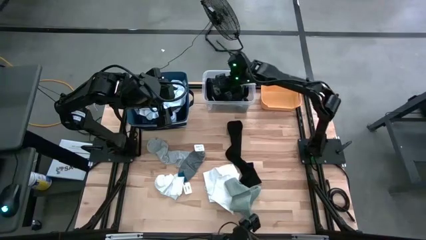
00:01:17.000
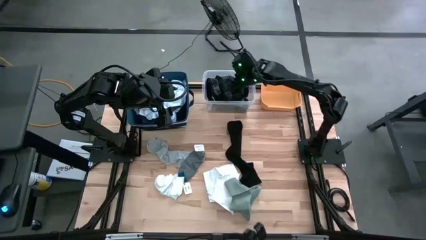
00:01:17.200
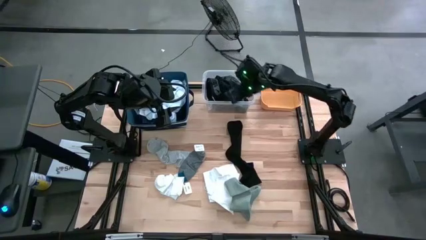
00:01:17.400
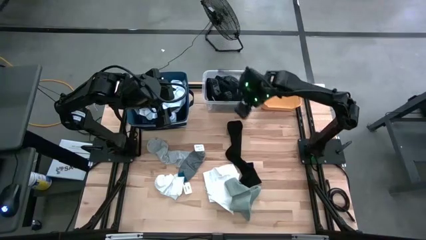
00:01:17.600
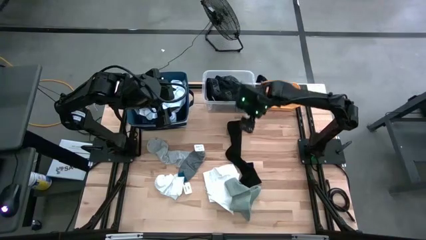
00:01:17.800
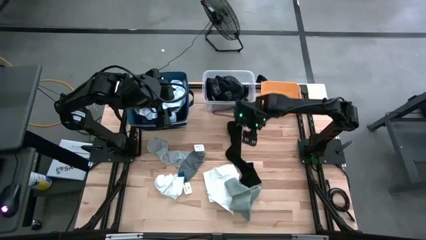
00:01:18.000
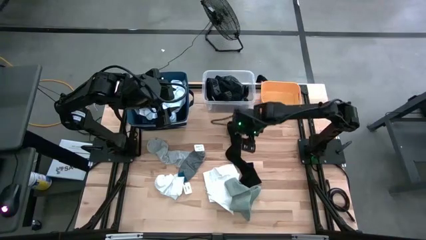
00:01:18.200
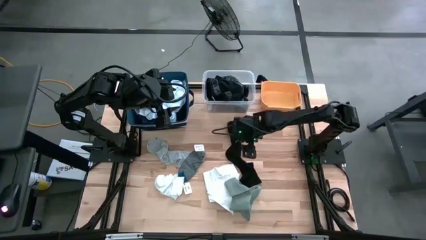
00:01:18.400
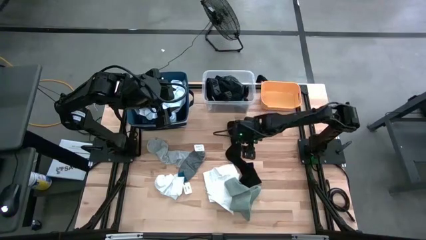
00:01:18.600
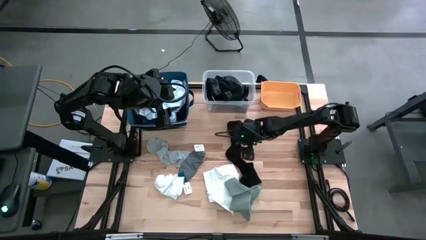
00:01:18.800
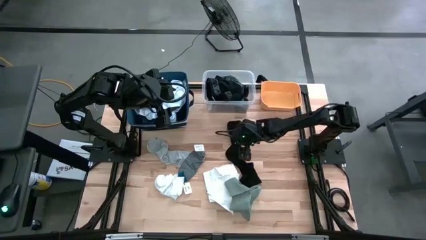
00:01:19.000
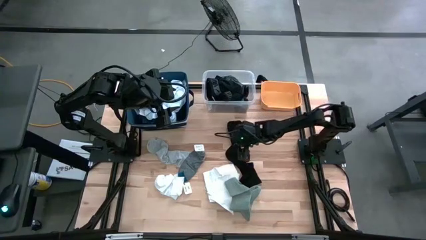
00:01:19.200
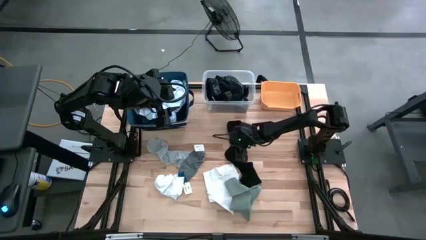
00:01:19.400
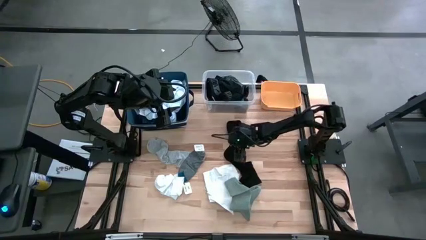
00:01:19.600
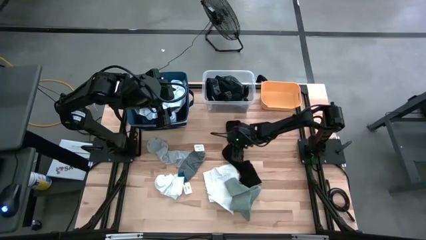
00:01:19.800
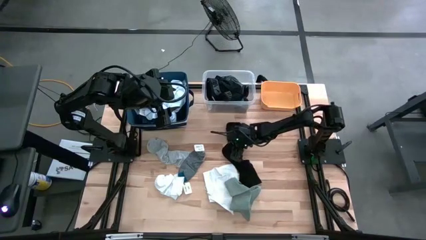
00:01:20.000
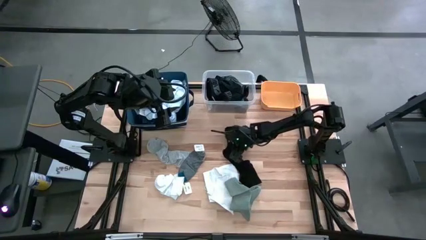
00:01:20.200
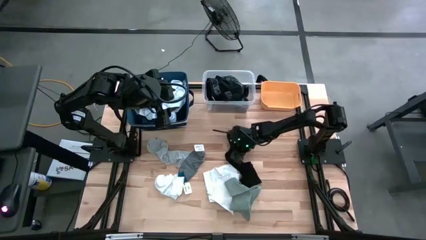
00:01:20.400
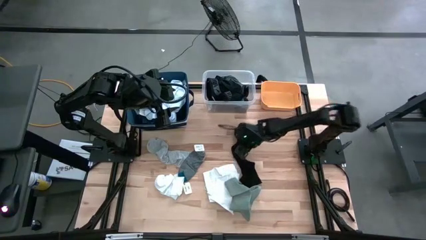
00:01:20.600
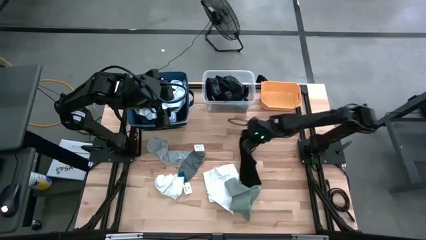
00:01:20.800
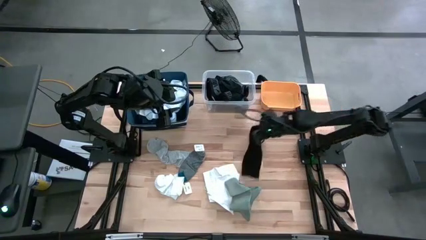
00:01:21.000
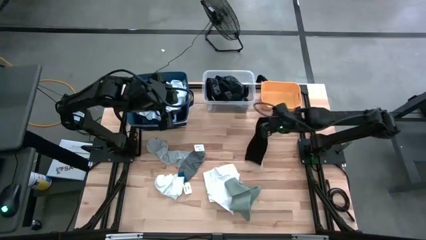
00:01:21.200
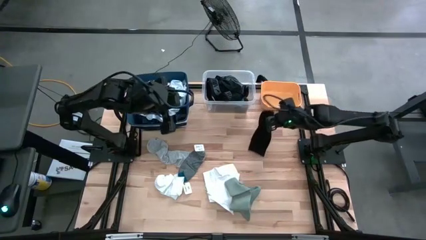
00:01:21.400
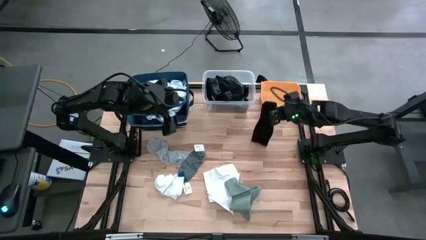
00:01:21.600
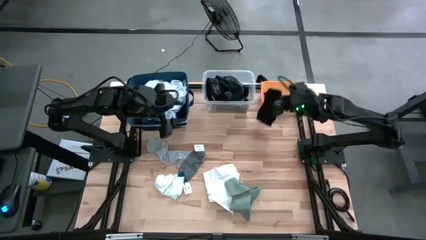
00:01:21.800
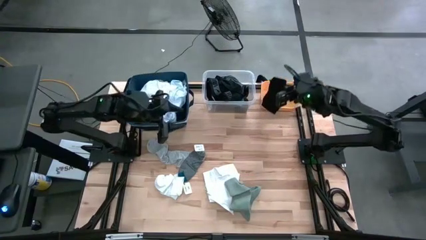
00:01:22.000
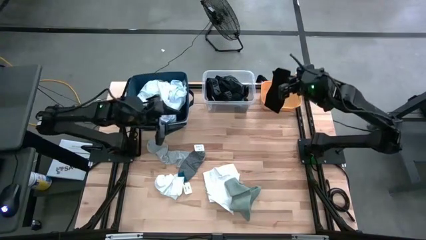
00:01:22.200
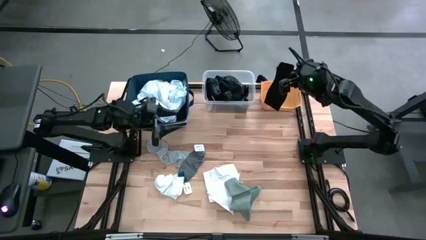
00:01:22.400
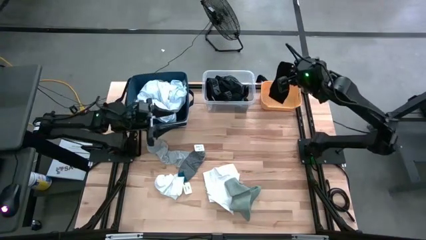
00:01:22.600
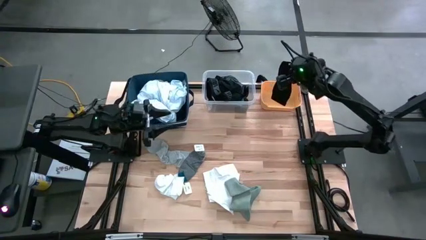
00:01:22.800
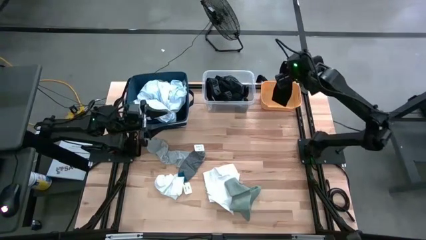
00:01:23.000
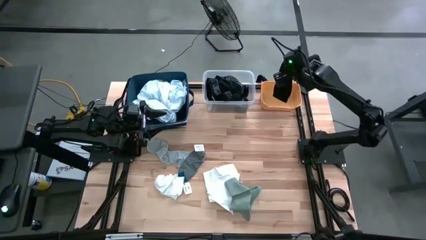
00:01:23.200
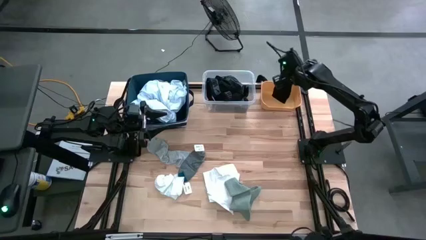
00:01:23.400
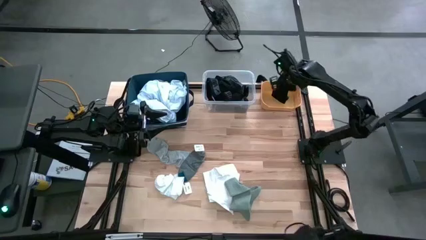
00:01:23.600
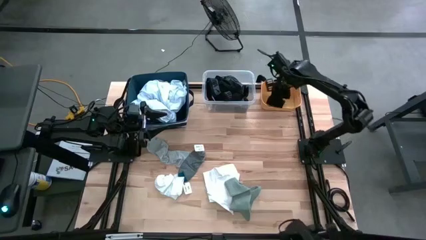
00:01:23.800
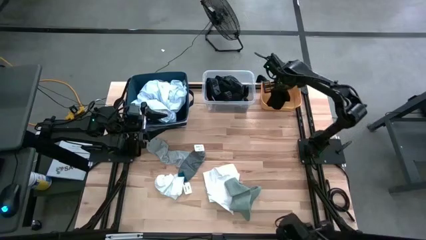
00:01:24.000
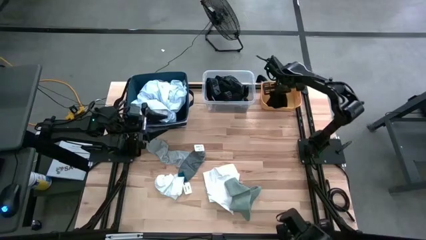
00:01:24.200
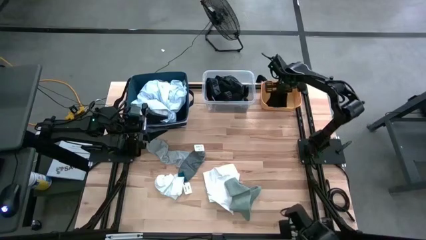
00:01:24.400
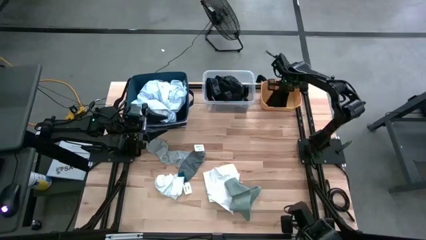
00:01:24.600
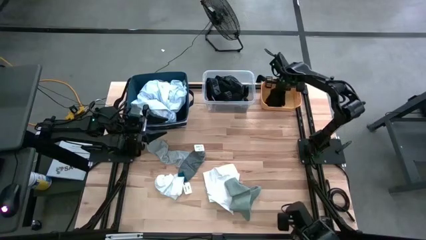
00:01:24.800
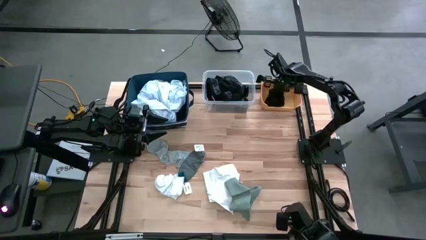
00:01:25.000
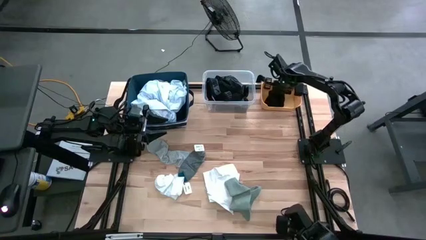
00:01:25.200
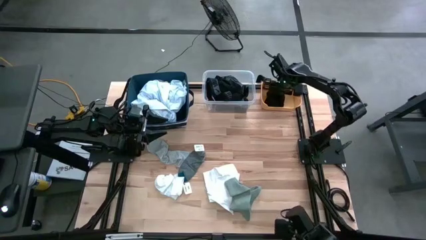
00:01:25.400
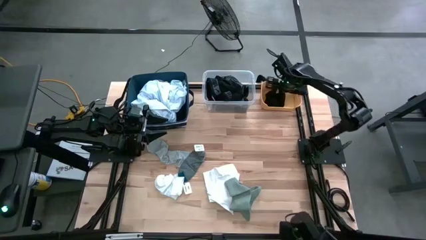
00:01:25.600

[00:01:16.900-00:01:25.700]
Task: Pick & Place Cloths
Put the black sock into the yellow bin

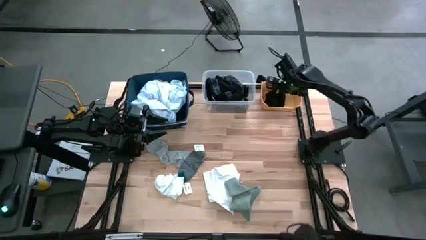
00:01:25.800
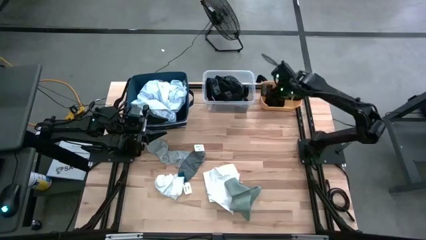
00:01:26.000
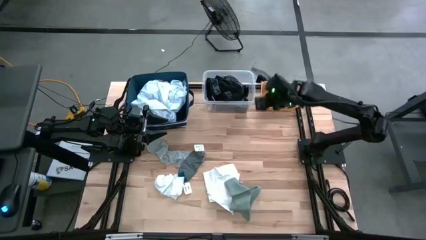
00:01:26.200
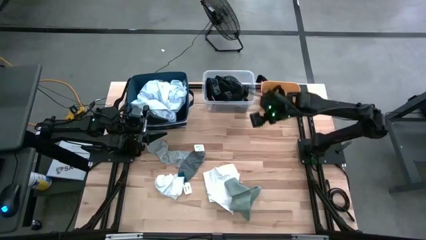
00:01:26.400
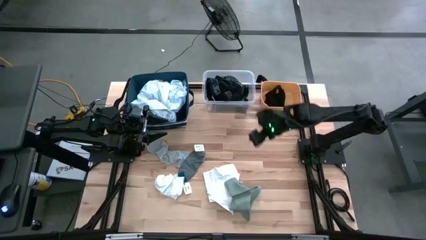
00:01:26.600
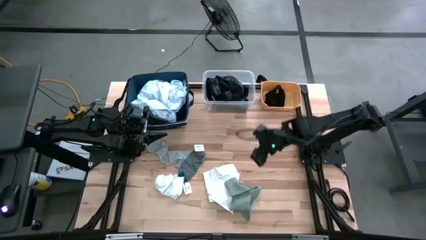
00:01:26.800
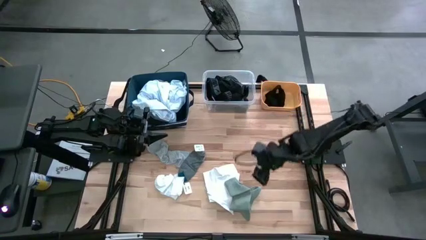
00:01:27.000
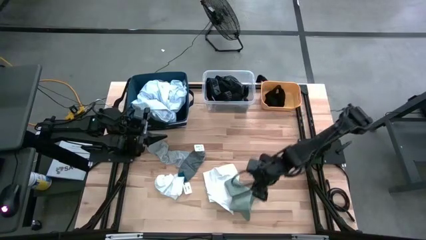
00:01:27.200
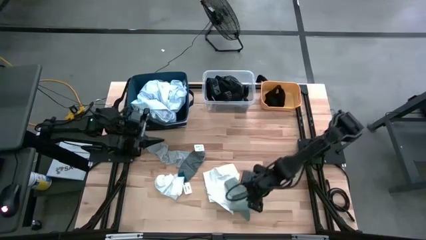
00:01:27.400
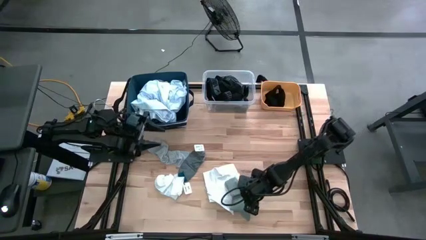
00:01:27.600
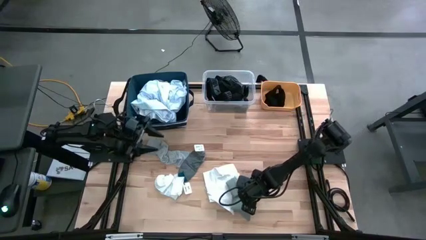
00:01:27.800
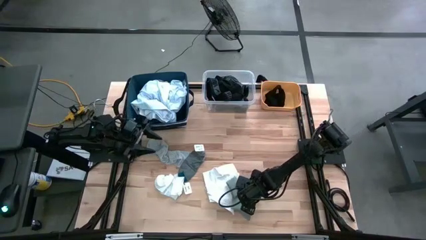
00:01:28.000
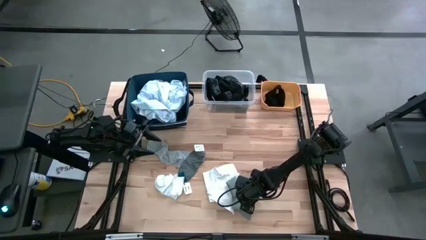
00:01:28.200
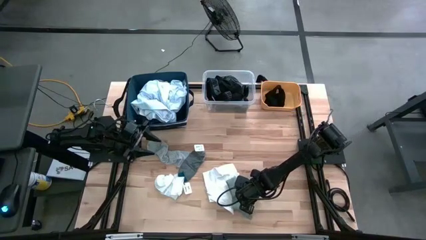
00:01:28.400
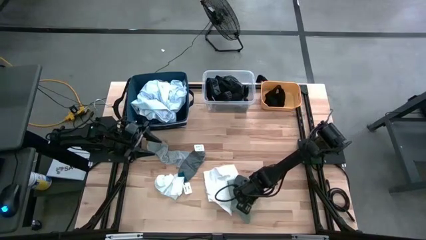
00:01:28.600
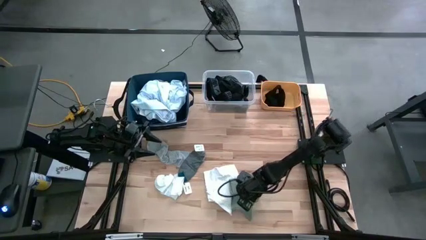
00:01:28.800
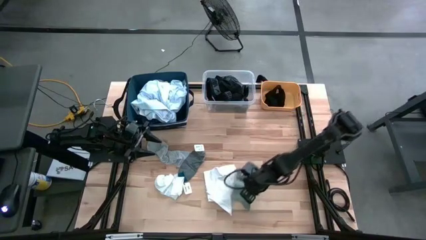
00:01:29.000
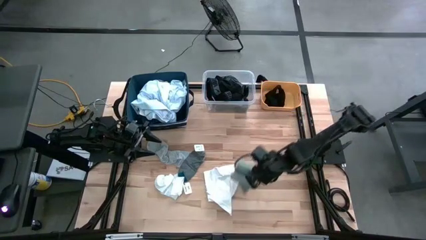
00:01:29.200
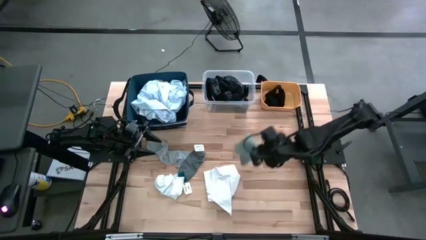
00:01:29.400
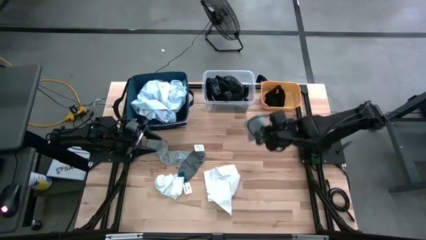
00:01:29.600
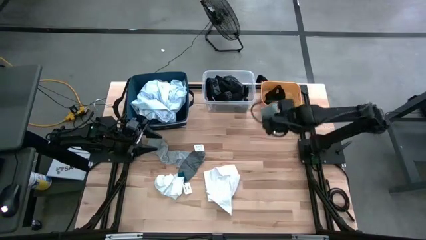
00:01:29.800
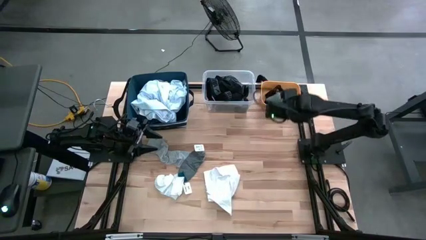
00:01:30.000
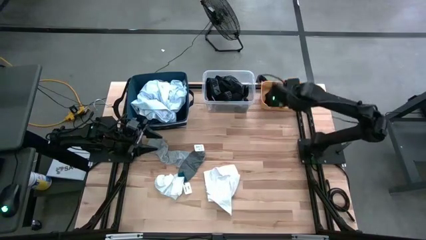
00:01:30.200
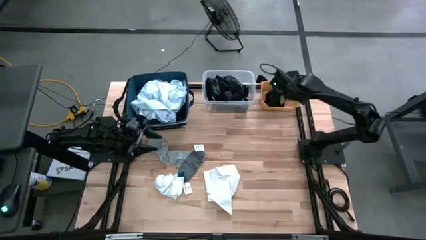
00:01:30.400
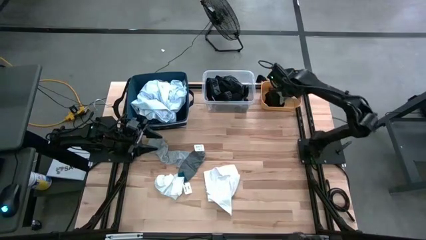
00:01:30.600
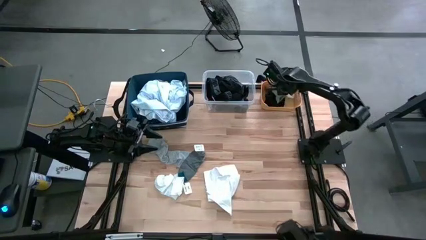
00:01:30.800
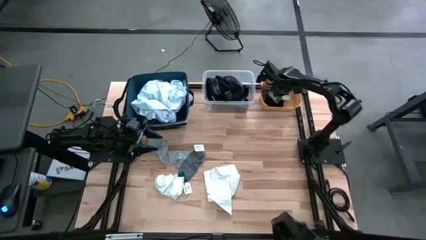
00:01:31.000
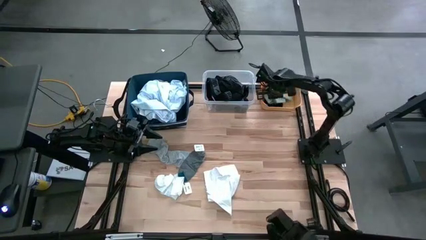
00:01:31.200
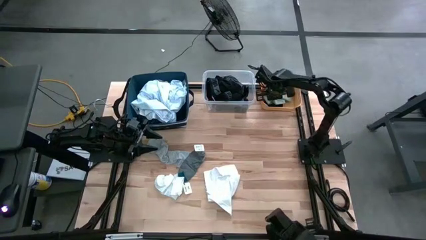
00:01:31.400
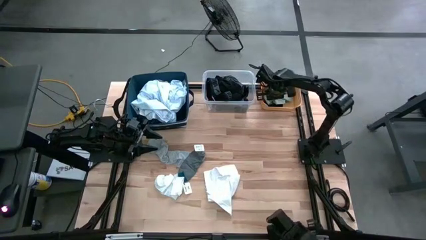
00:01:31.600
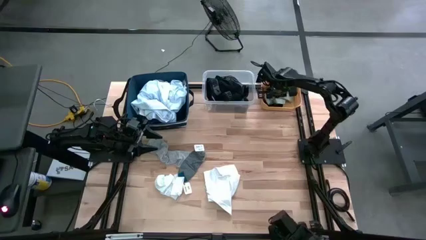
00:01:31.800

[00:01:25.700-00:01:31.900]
Put the right gray sock into the yellow bin
